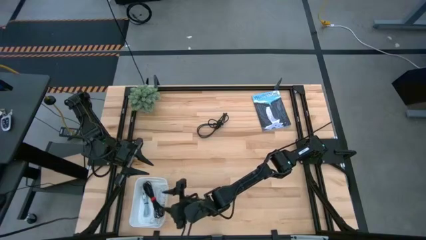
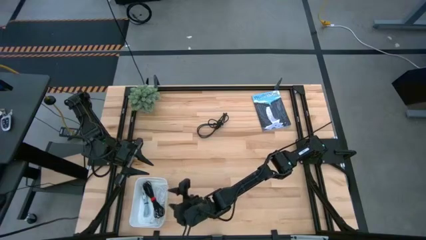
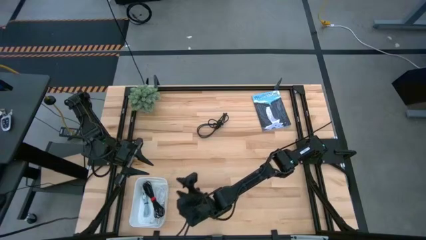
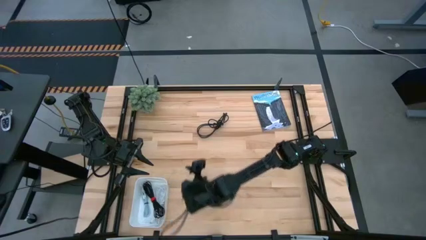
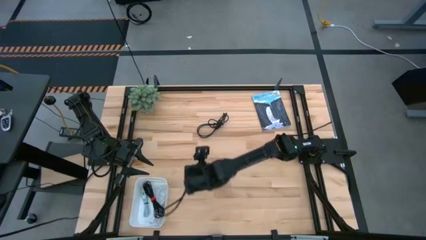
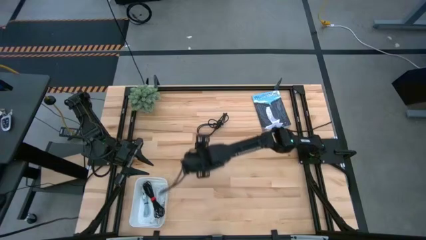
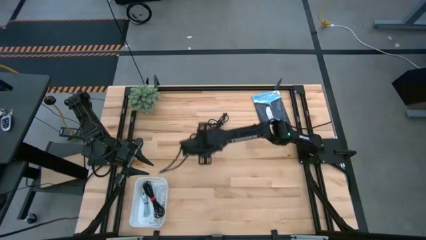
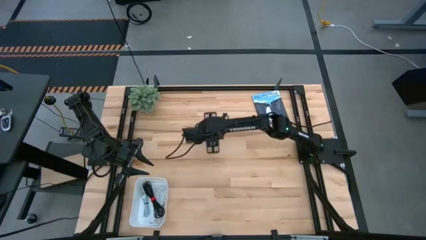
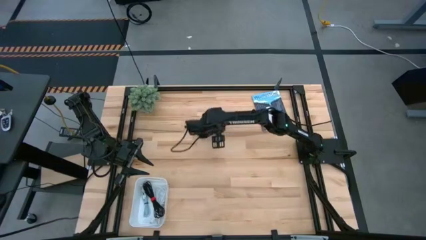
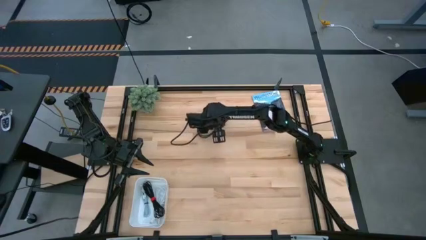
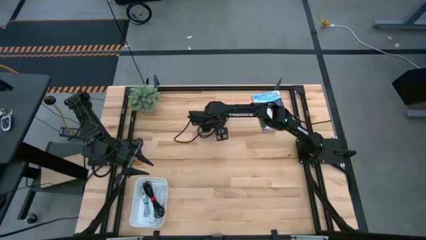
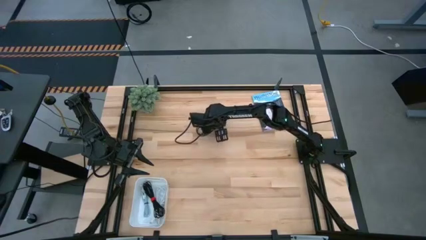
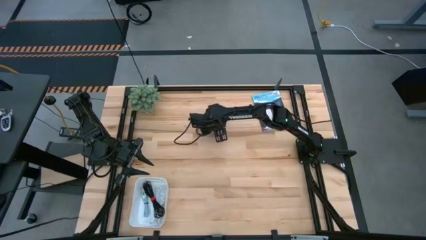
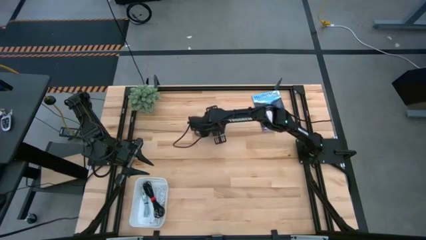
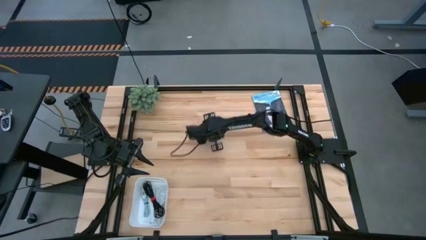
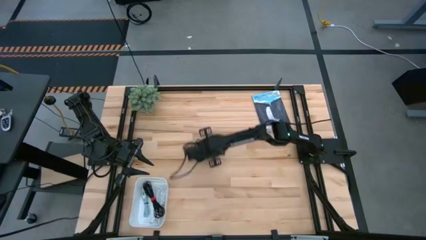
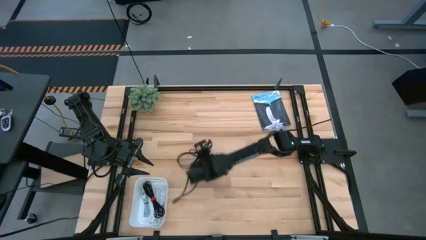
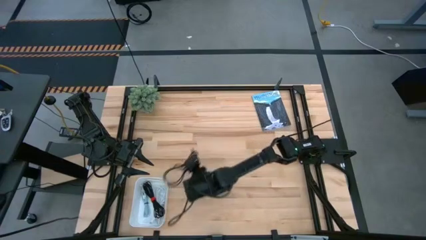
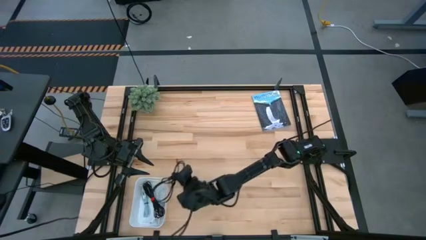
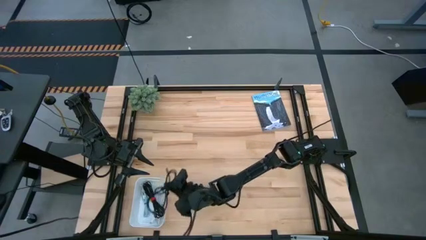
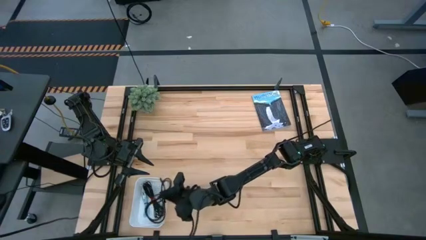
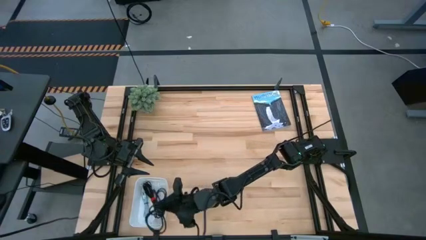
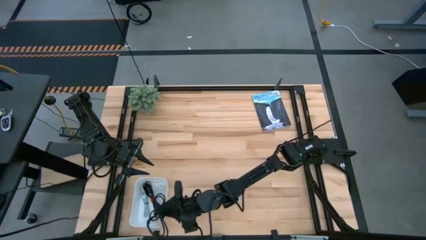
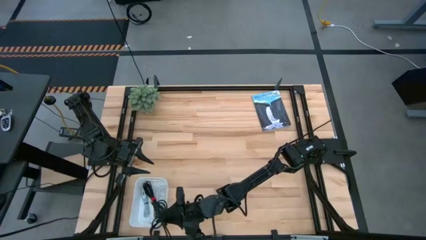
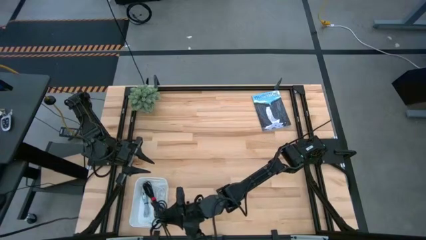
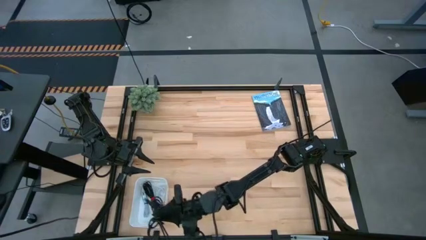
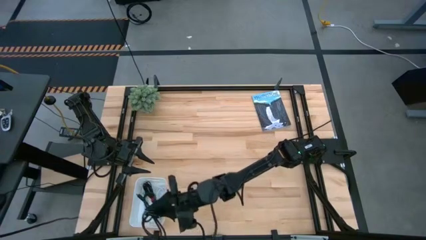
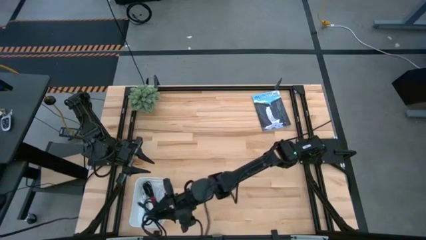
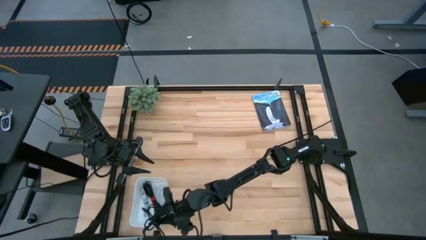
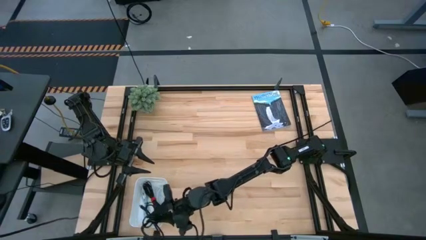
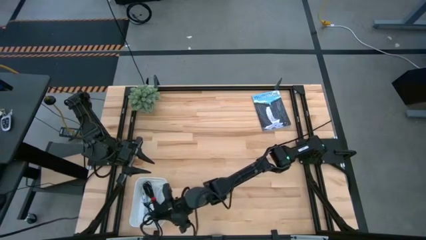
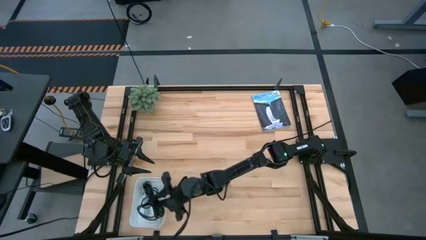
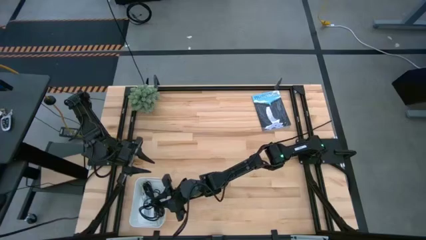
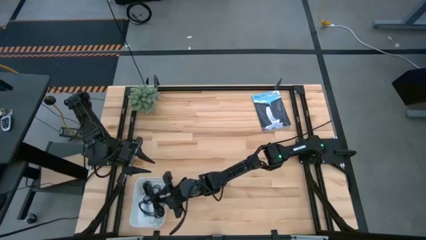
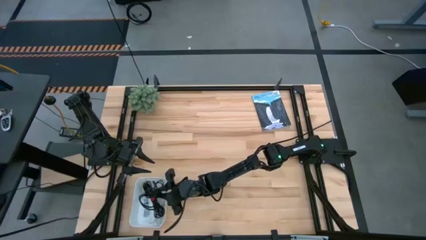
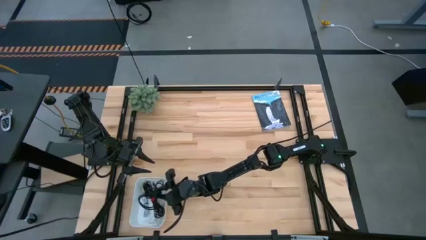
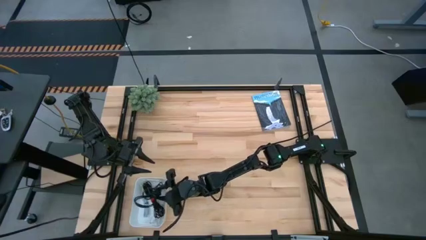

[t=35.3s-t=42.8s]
Task: Pick and place USB-C Cables
Put the black charger cable into the white bin

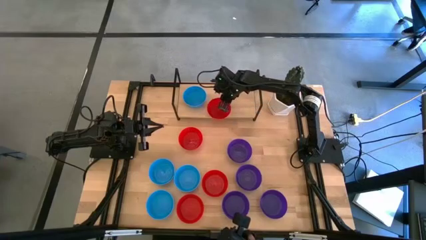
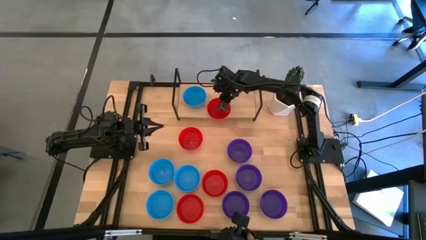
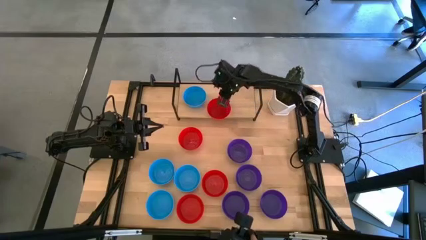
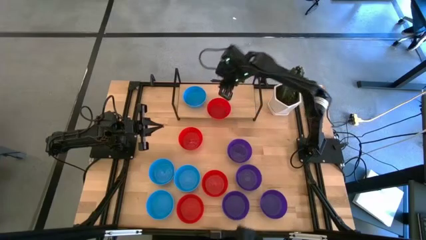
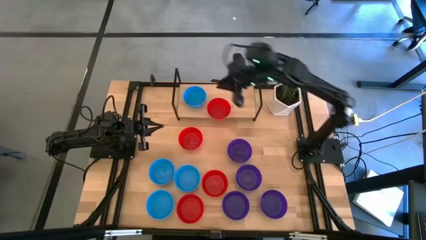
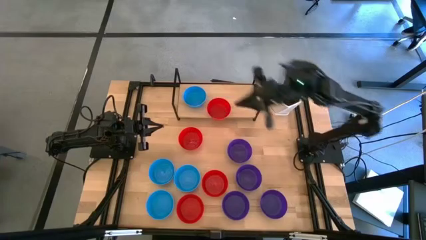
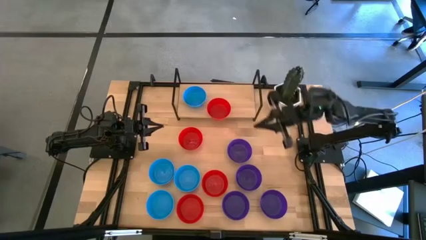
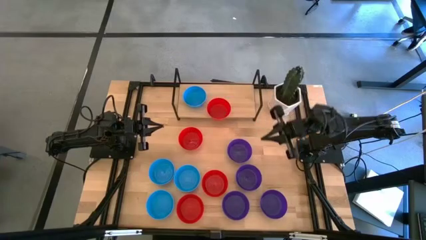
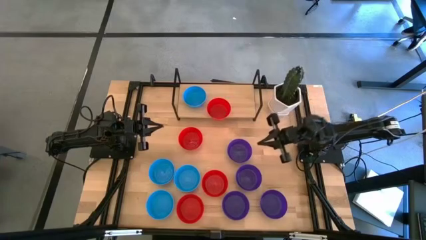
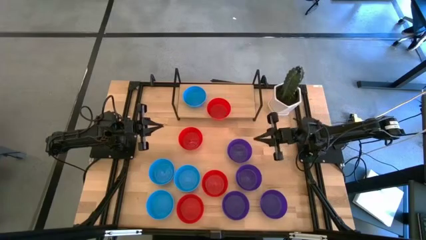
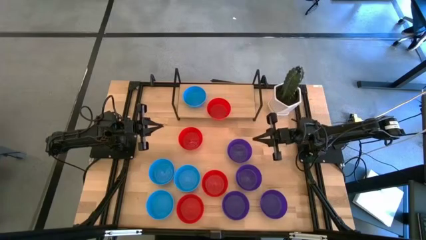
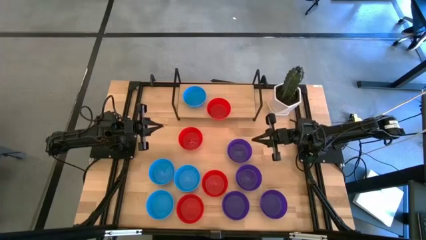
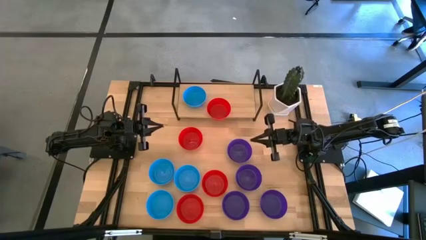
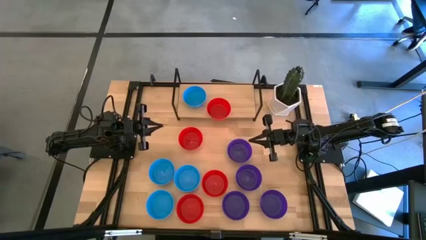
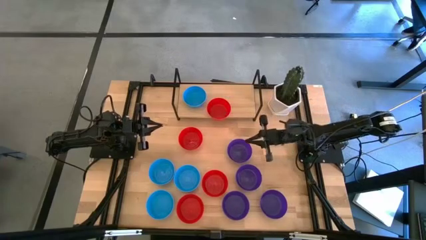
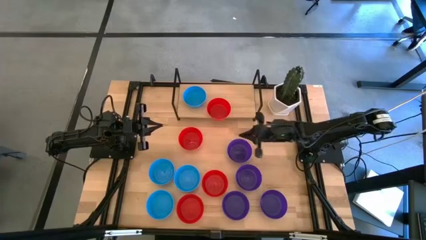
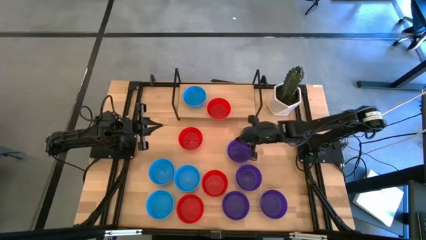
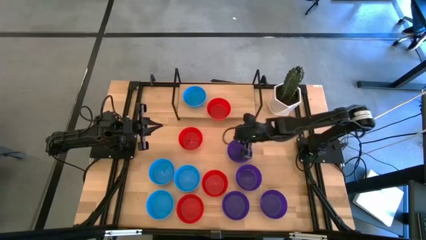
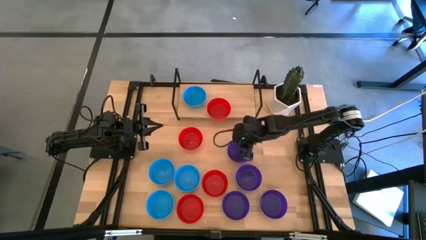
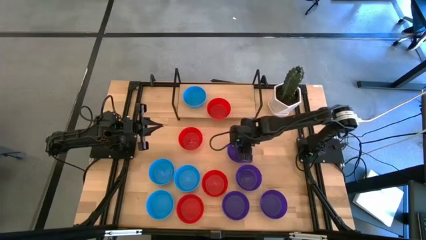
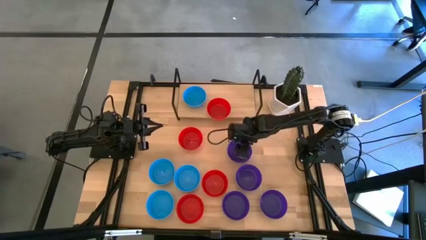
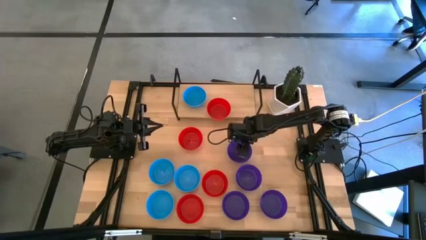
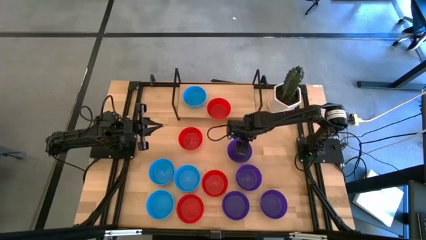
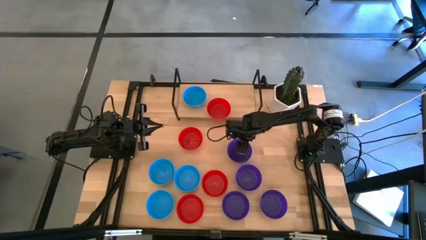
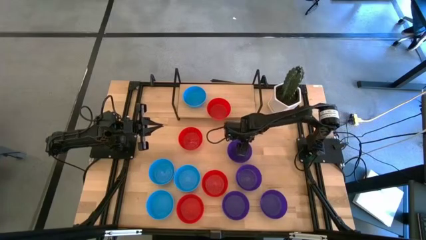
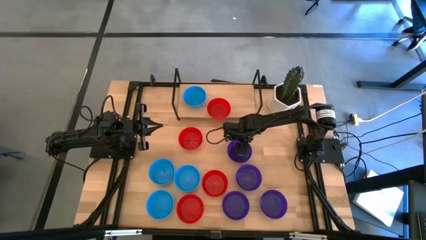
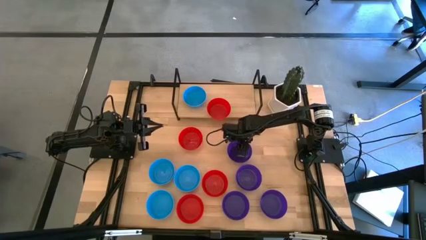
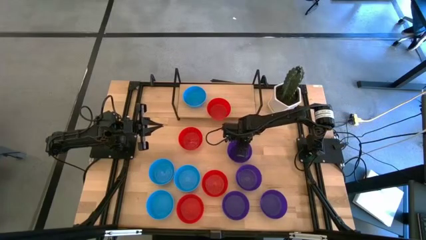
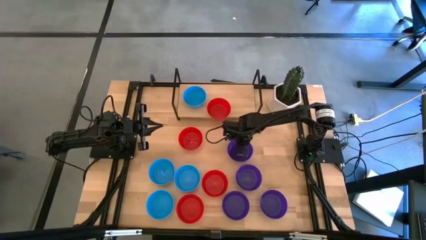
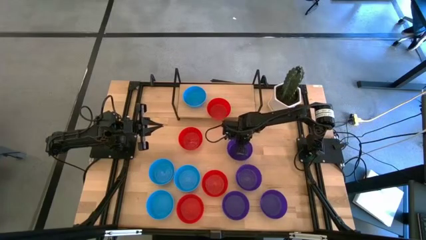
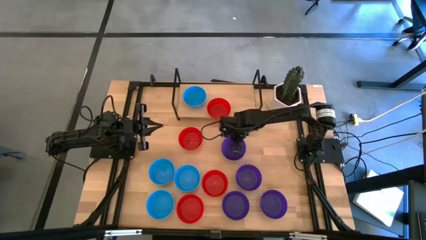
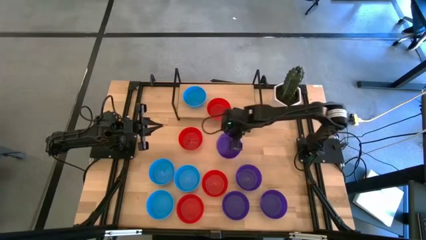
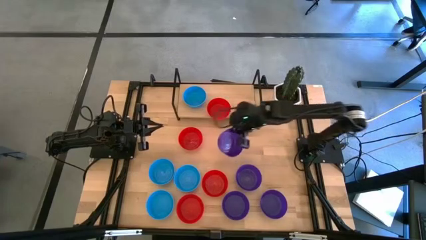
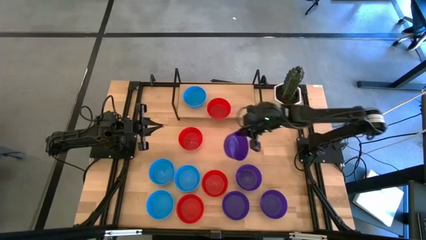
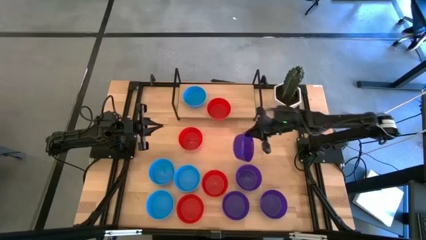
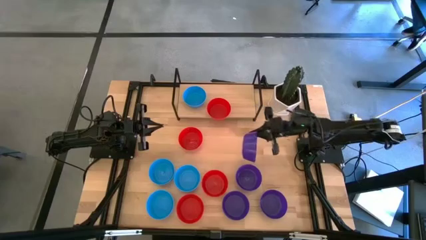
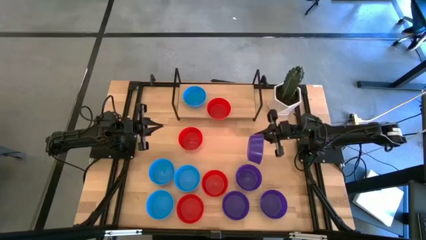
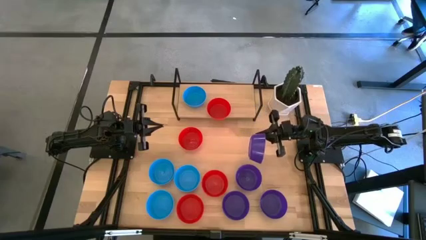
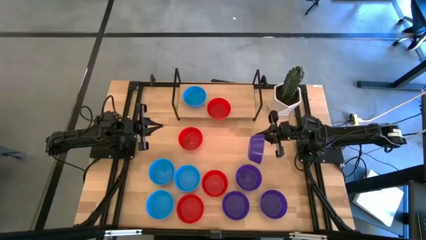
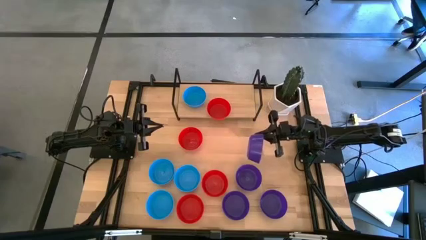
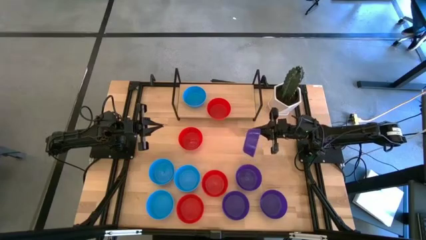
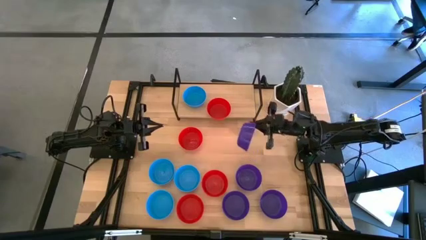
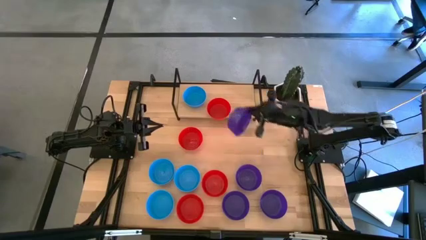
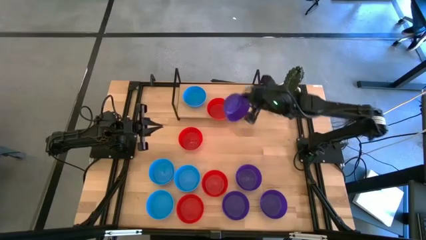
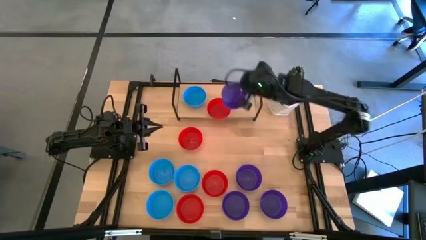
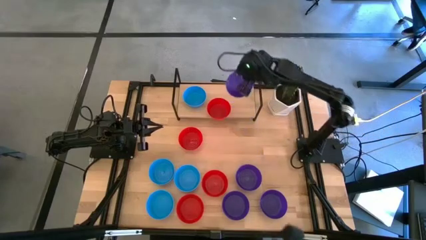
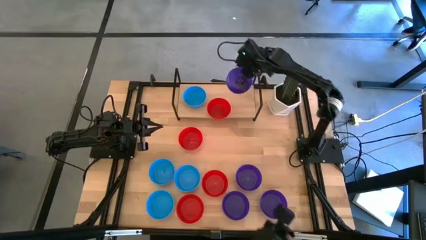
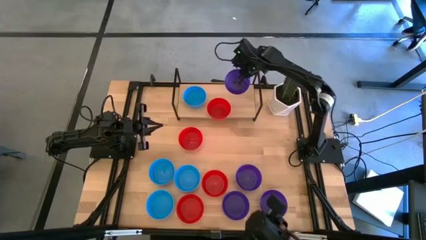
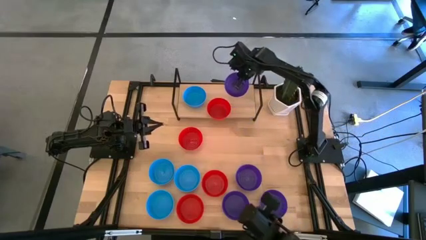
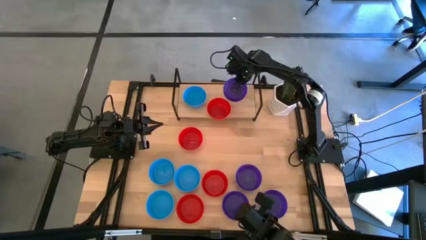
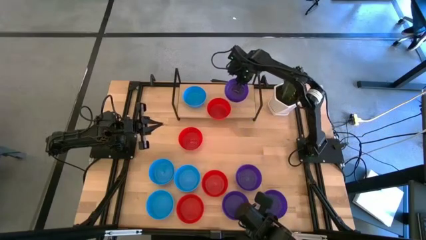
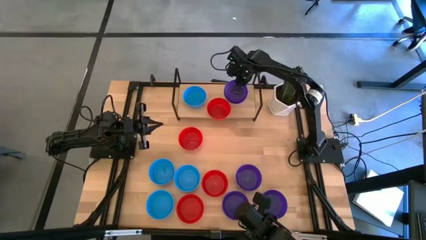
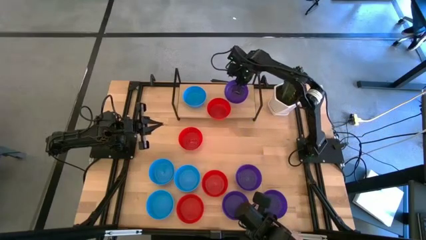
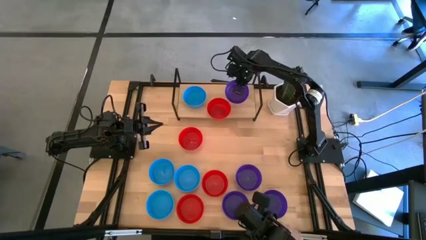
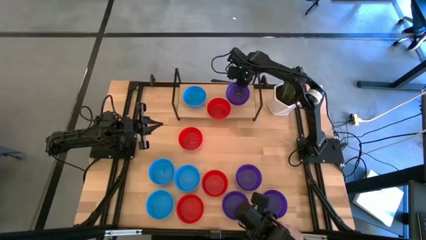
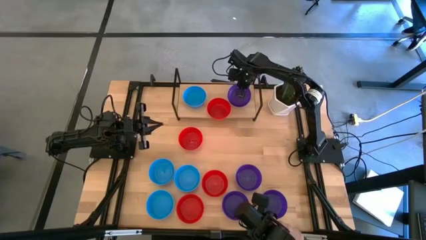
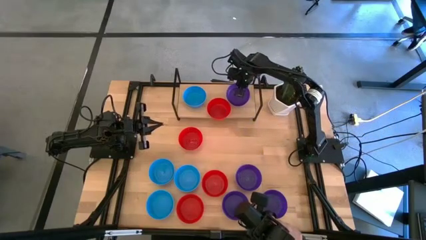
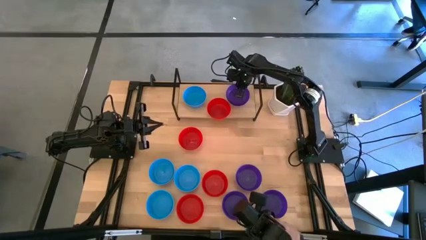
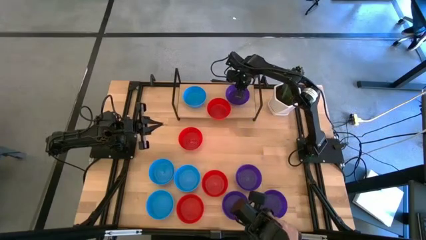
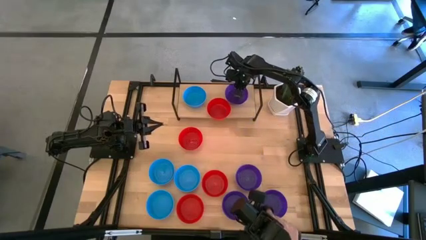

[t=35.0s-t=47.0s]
Task: Pick & Place Mini bowls
Put the purple bowl on the shelf
